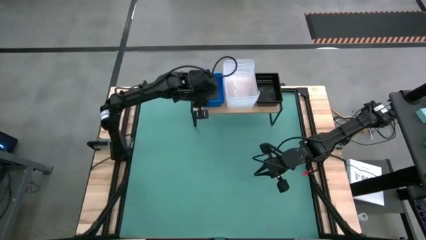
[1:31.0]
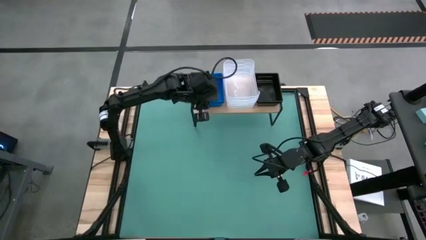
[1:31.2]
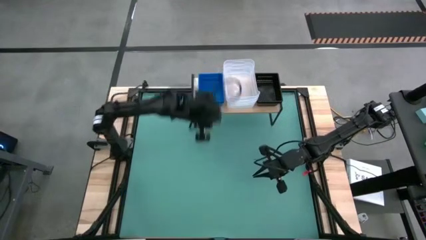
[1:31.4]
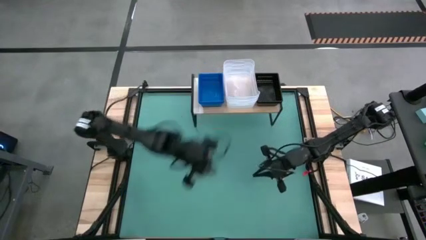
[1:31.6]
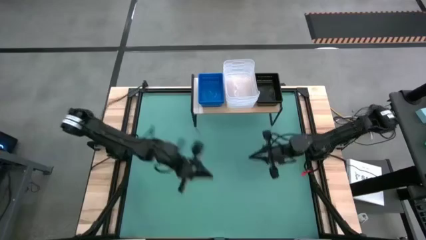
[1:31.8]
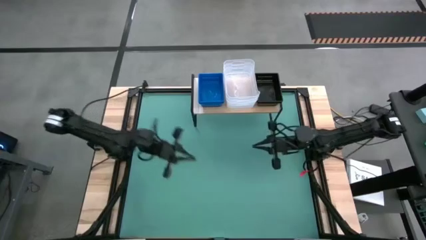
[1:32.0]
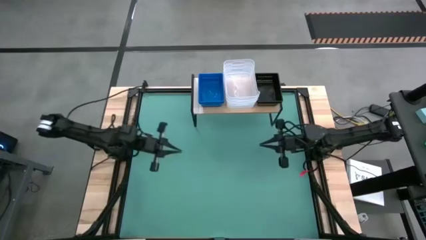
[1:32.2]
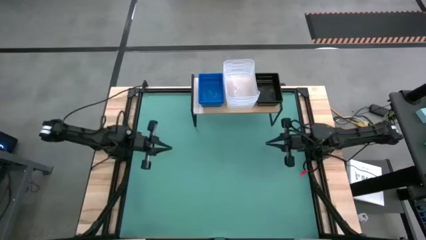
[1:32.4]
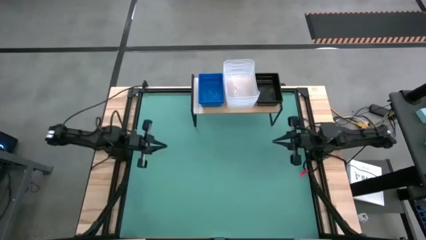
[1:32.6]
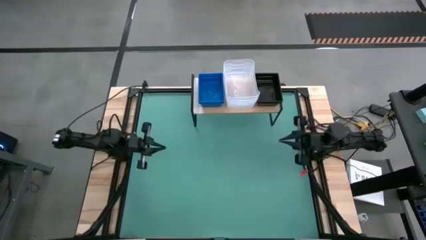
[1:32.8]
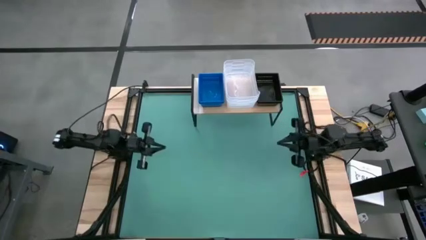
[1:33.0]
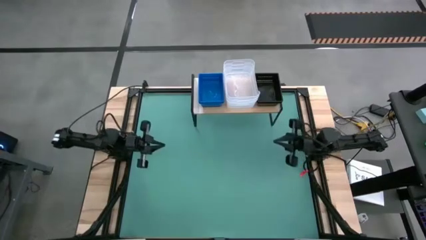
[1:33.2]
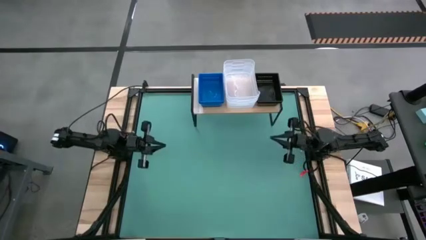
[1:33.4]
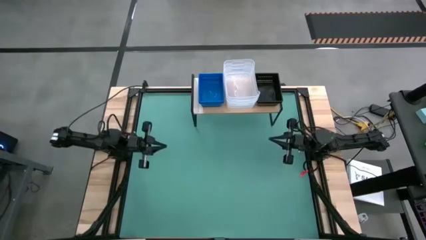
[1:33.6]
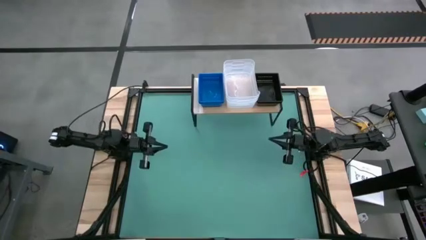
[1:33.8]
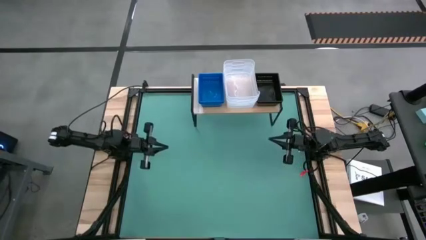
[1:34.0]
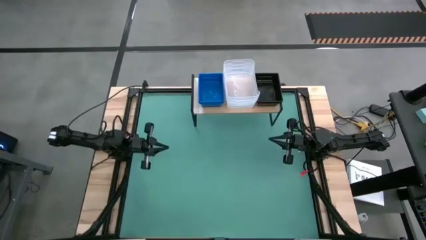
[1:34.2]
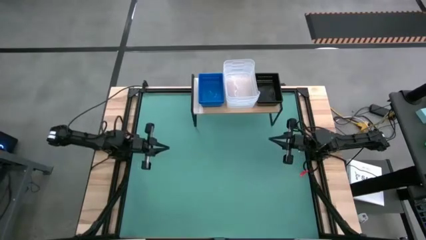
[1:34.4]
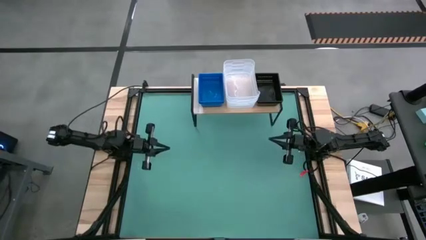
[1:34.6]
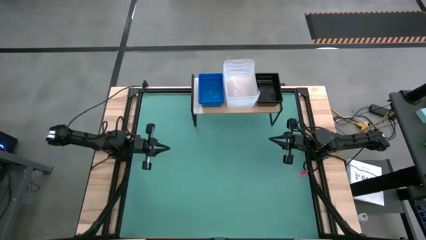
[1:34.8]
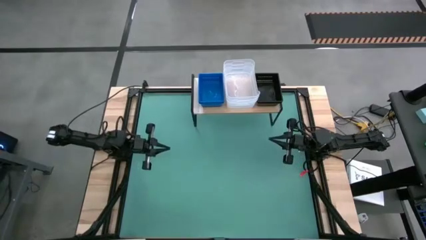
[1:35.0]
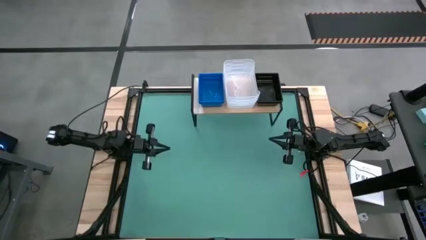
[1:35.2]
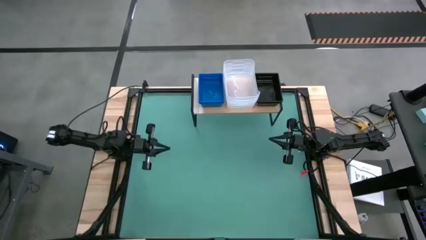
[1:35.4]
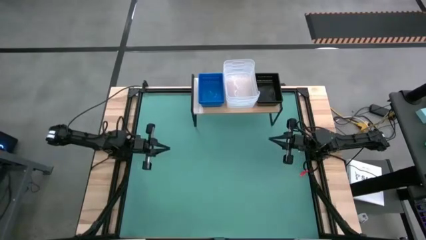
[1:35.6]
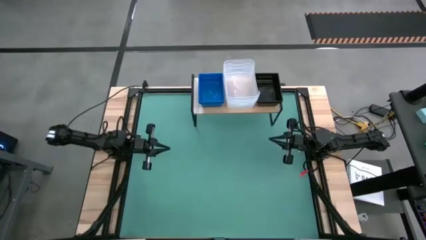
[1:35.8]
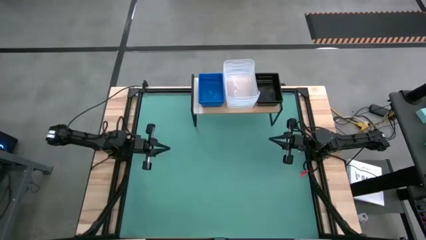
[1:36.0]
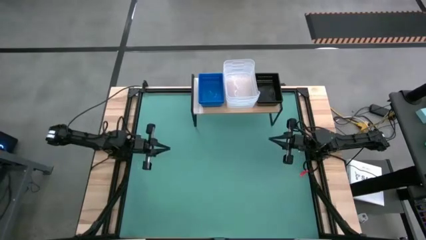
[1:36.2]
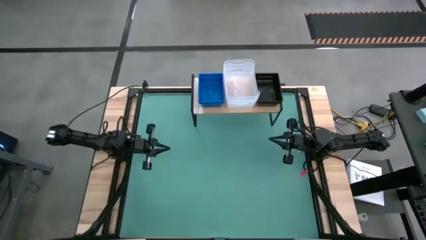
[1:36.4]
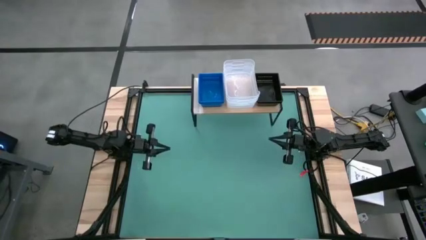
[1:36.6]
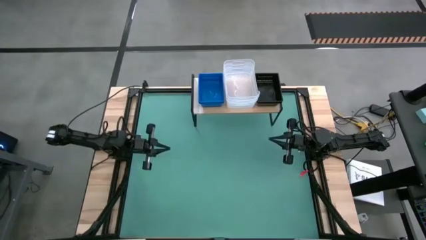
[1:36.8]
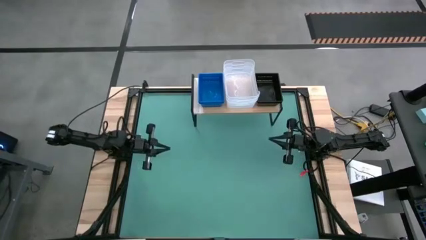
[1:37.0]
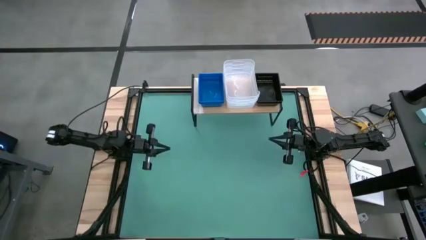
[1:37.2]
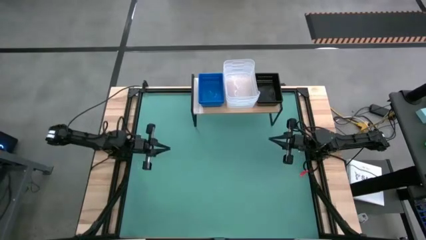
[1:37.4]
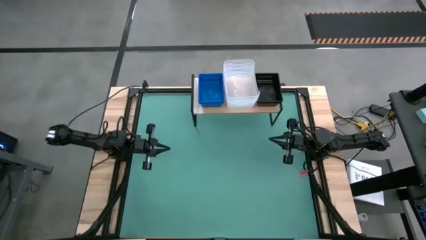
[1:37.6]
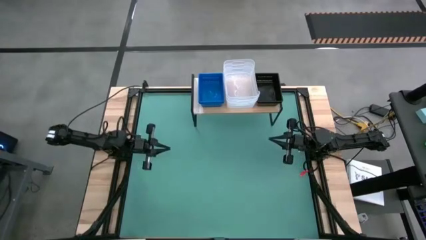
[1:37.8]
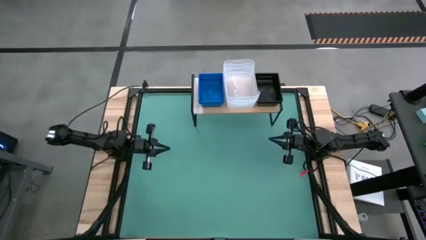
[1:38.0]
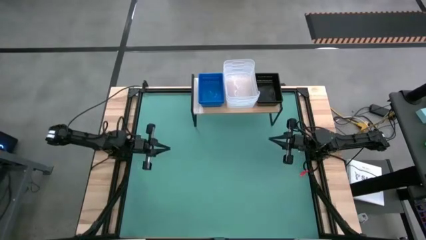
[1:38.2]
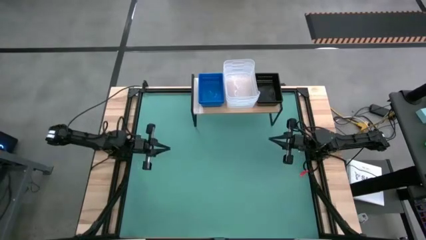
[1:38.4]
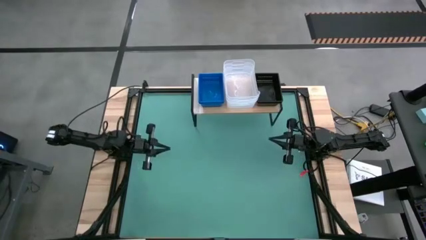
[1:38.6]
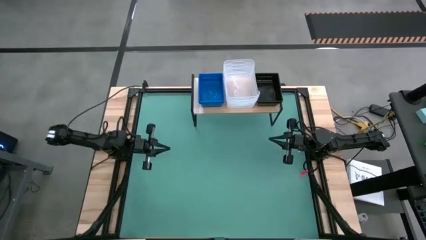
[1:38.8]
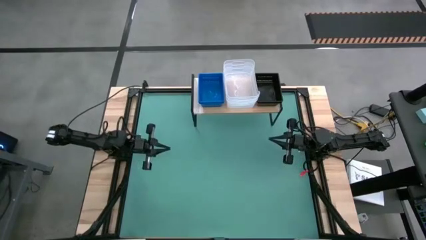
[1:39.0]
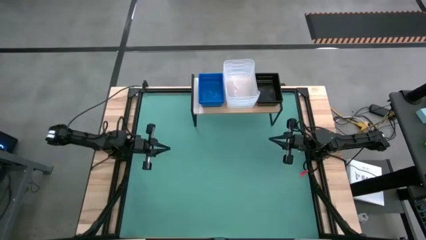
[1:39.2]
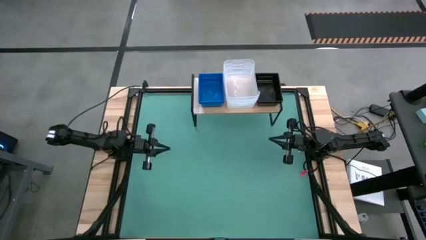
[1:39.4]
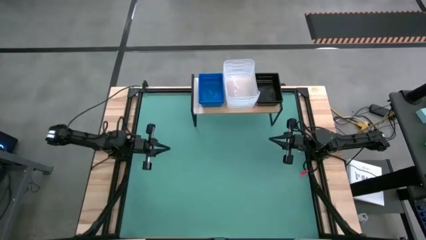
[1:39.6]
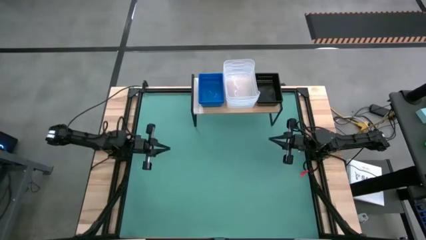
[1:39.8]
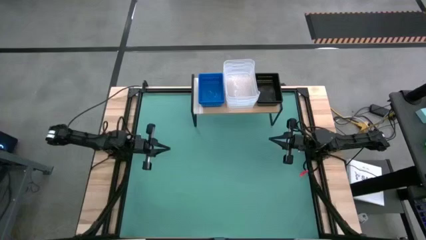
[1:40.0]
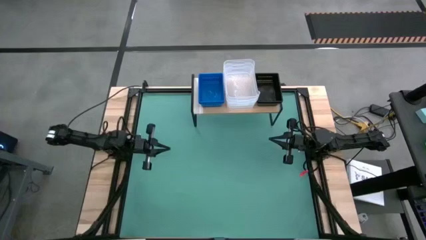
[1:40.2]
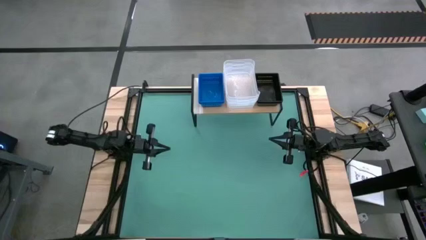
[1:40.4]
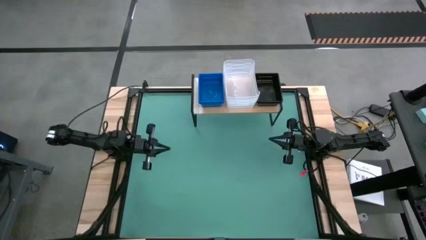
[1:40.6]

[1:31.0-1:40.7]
Task: Stack baskets on shelf by color
Return to Home Position
